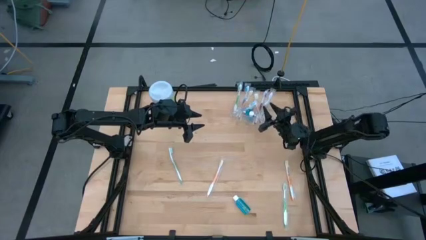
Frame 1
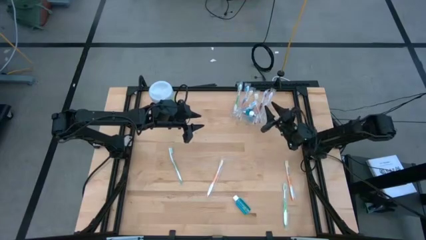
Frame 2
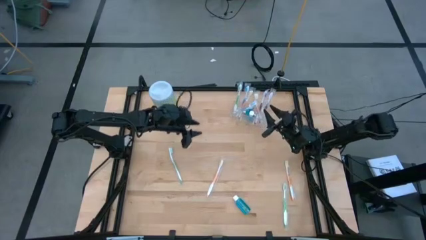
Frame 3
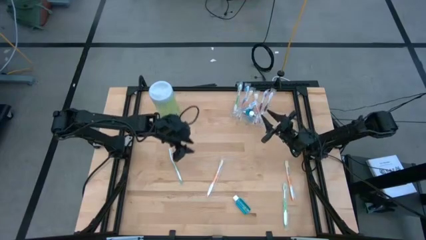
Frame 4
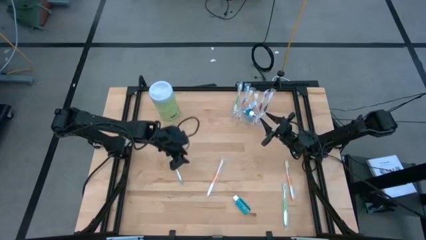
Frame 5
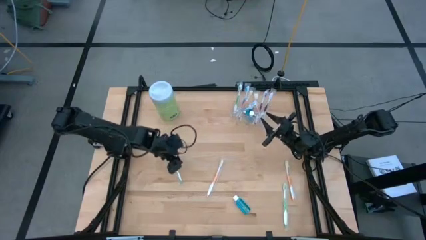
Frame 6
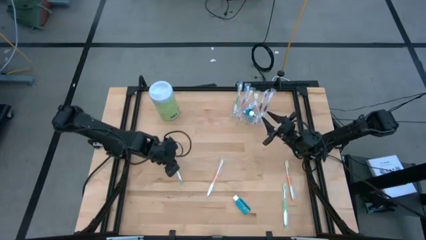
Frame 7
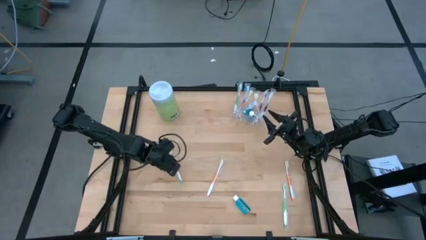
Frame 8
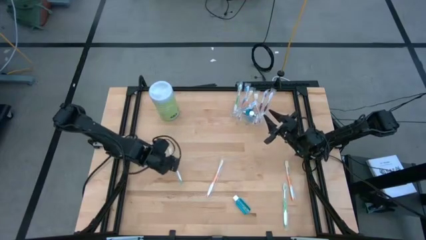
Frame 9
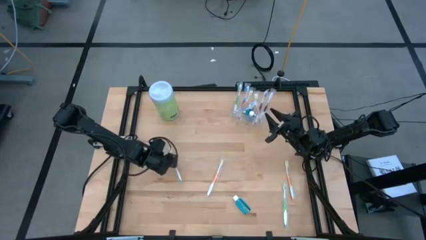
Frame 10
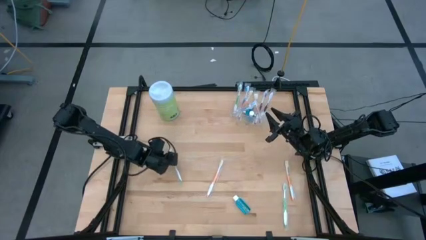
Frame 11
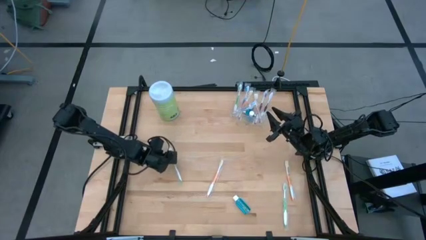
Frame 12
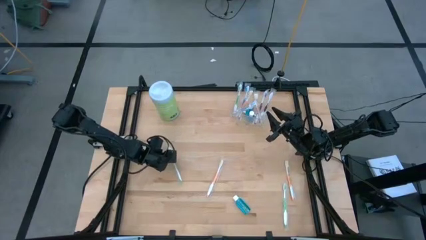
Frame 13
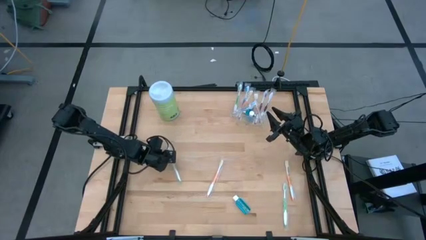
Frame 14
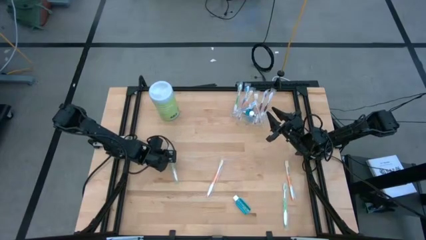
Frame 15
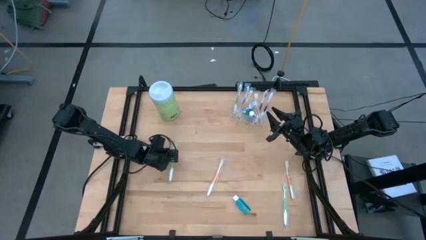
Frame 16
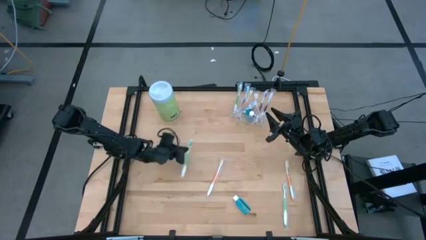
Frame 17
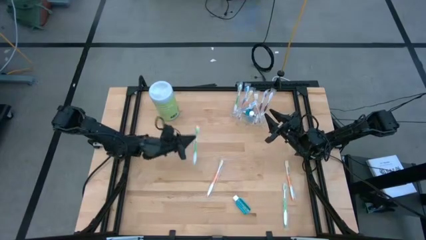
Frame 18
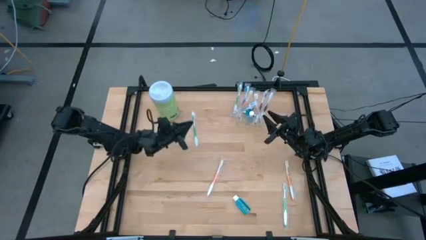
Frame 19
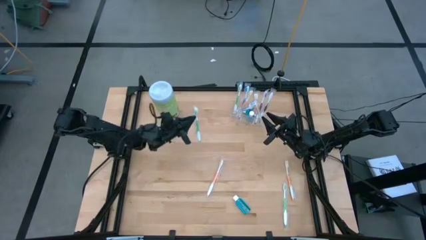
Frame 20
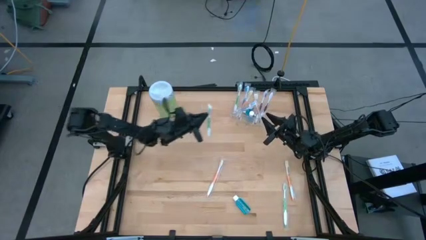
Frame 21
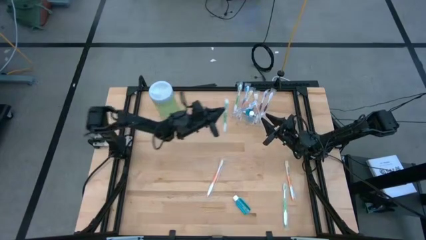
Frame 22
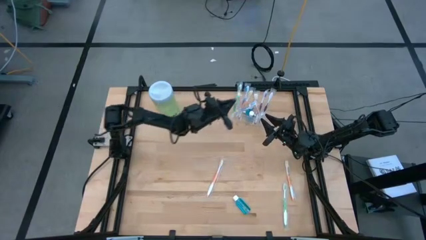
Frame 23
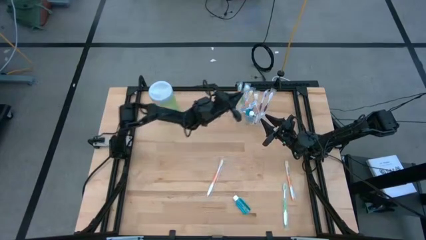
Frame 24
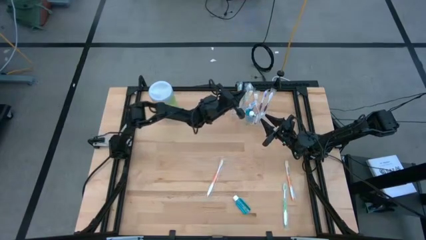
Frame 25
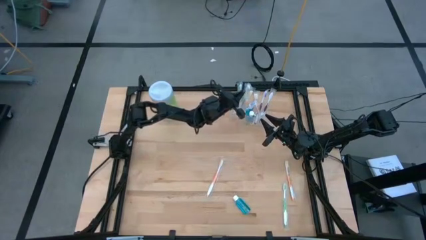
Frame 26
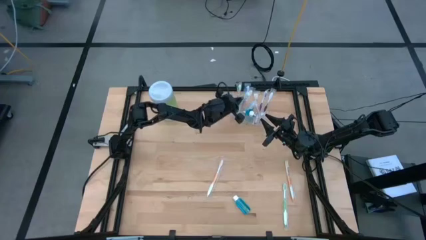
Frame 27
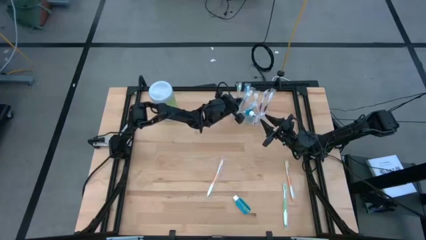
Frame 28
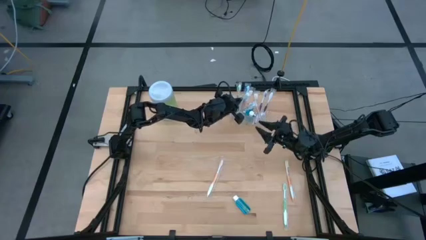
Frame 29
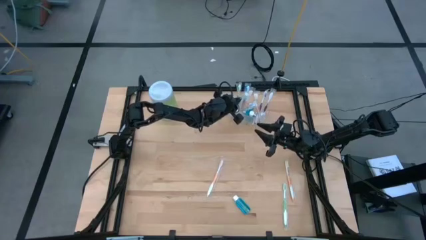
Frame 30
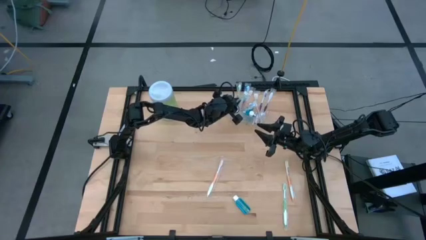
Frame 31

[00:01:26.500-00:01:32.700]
Task: Pick & Place toothbrushing station
Put the green toothbrush into the transparent organizer

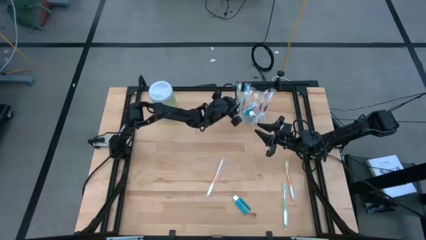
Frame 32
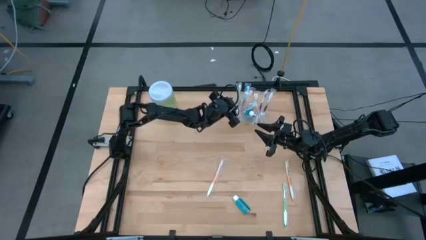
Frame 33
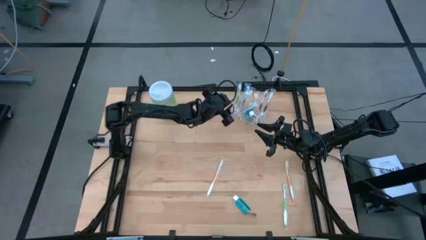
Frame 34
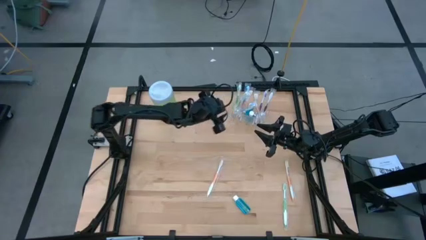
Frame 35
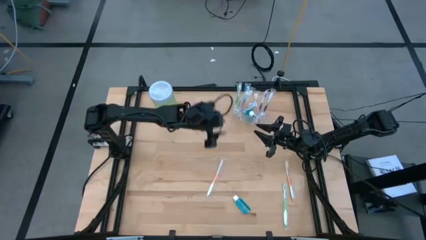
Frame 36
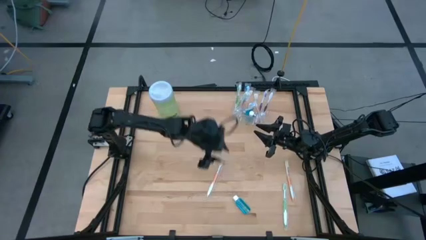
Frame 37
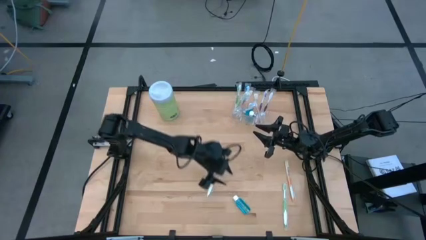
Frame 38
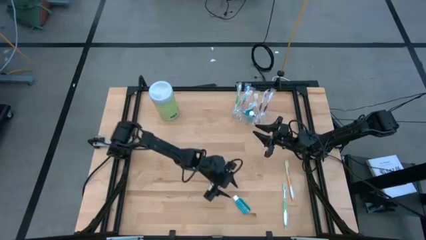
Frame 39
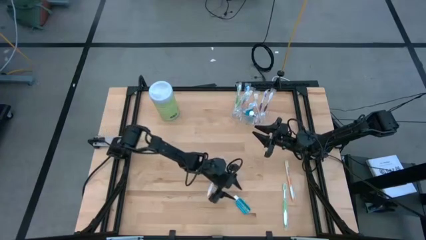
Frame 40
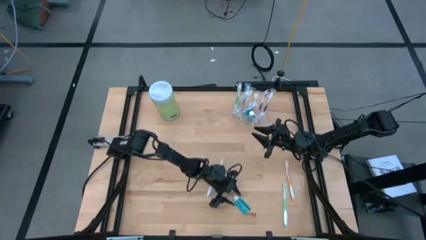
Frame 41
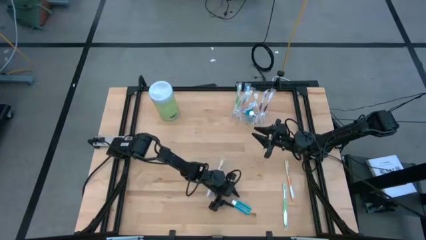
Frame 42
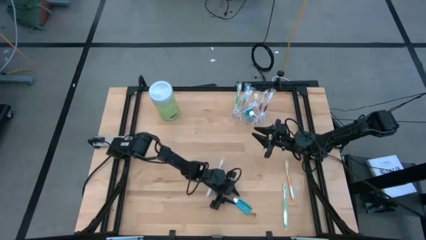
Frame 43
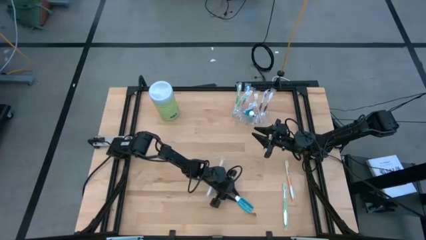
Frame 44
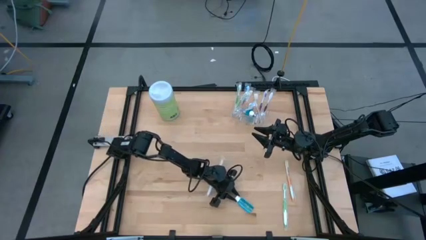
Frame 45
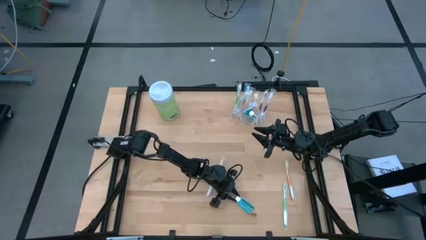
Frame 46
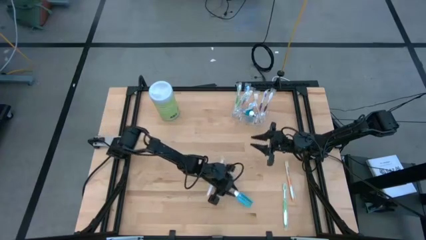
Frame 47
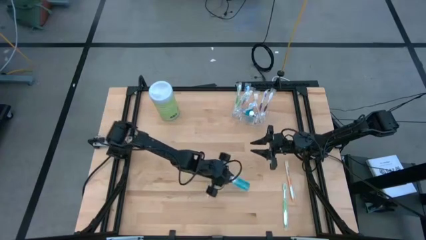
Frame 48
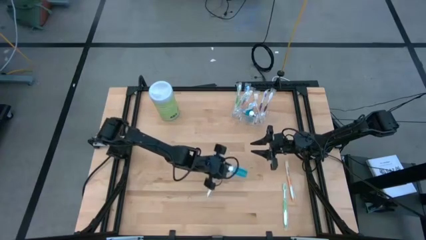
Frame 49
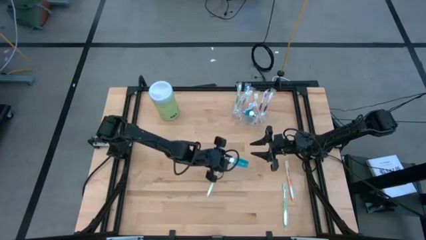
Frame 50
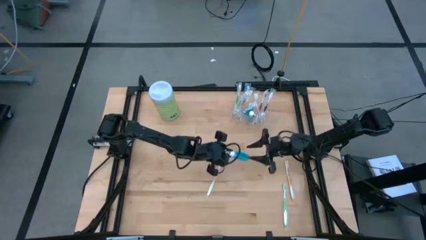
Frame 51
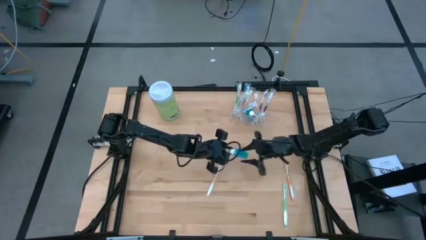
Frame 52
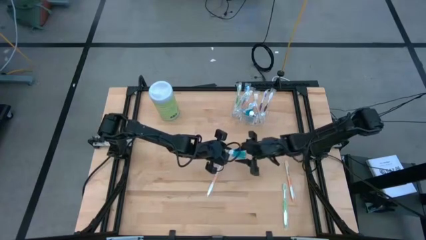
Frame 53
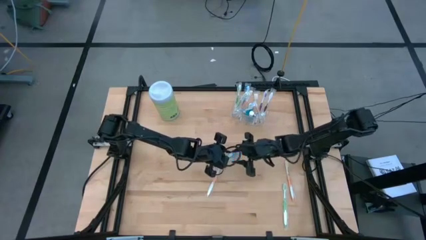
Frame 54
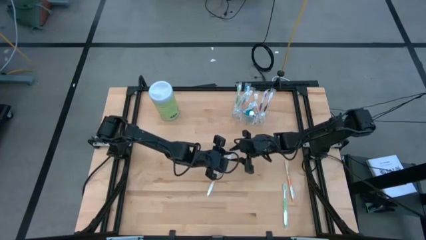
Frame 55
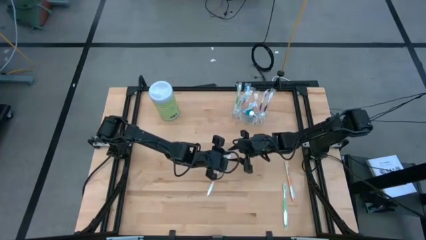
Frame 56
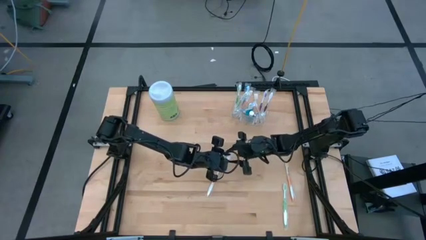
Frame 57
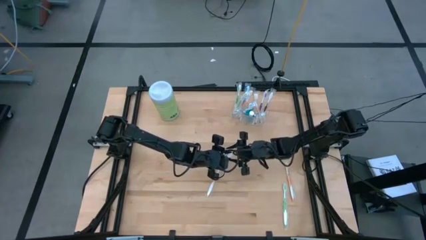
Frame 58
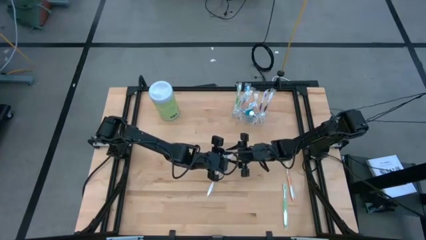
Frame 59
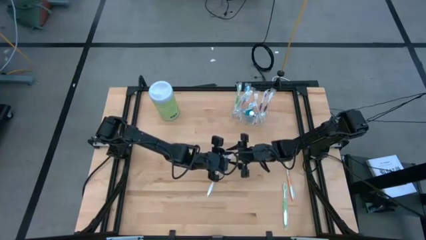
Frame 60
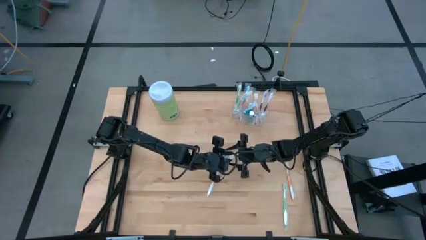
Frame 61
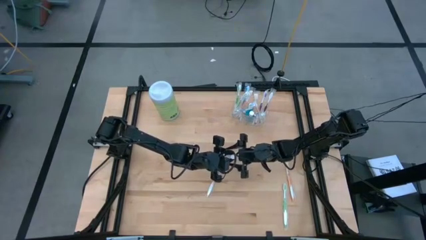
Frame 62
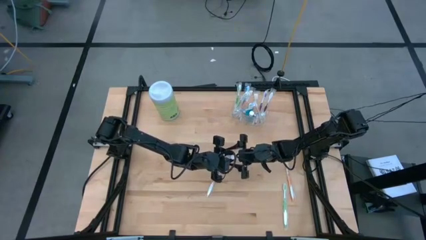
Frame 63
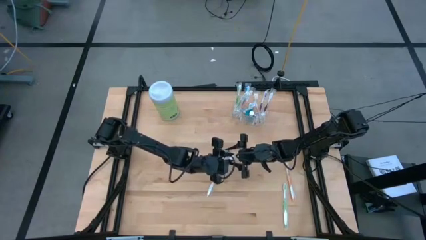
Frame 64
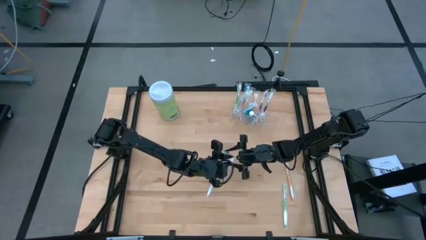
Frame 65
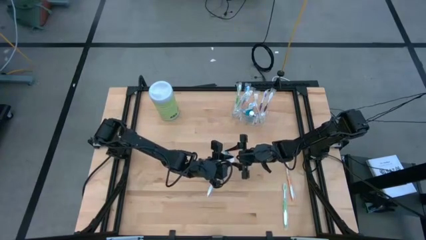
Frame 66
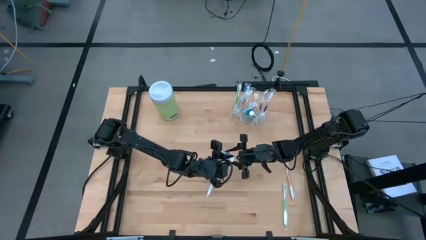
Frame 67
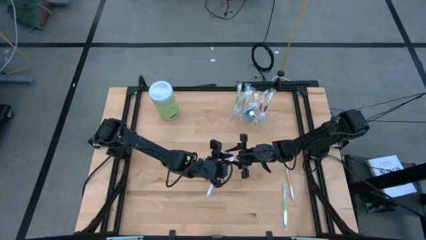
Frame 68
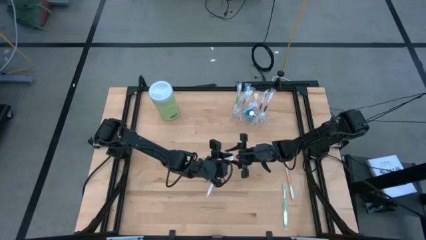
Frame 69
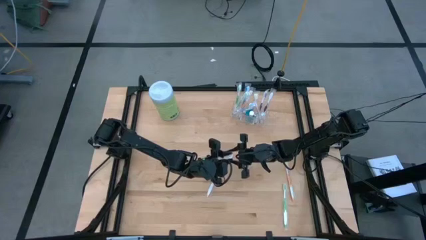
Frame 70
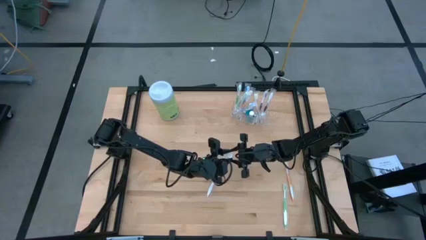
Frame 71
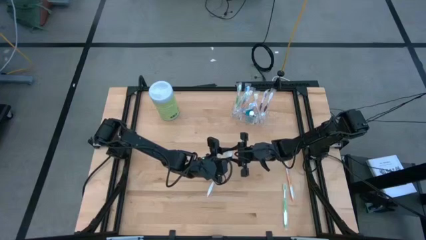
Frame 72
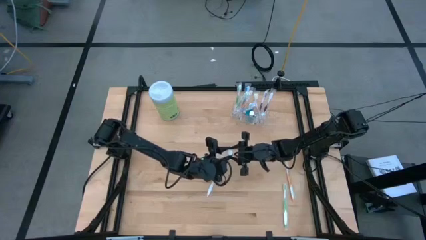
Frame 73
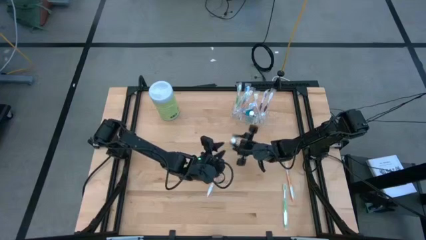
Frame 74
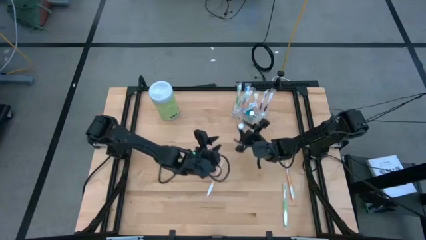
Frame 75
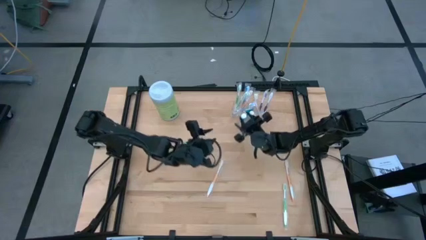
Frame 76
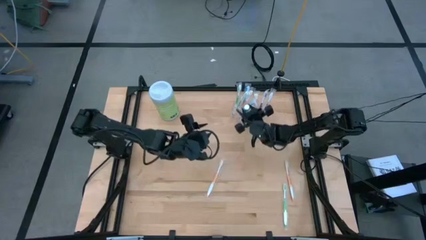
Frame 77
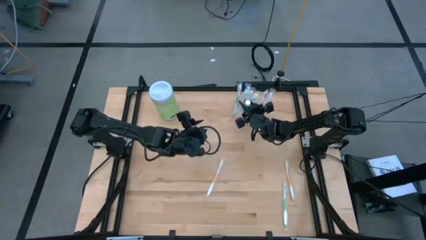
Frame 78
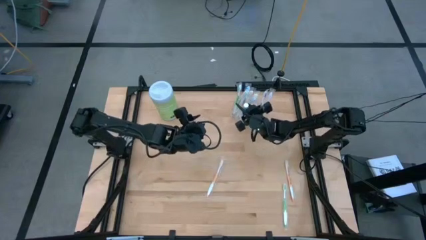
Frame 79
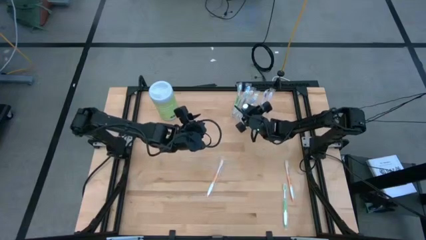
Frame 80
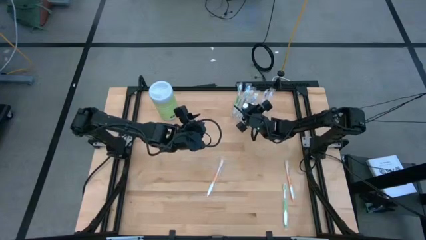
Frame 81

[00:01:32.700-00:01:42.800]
Put the blue mouthwash into the transparent organizer
